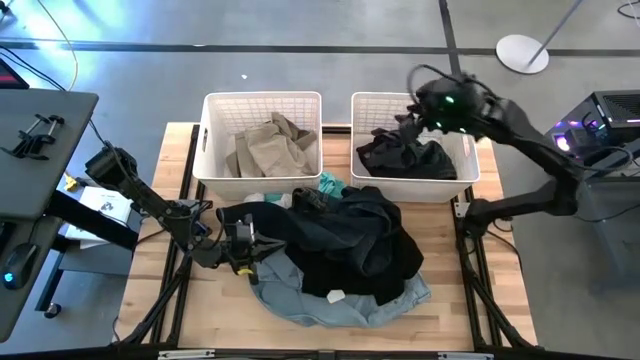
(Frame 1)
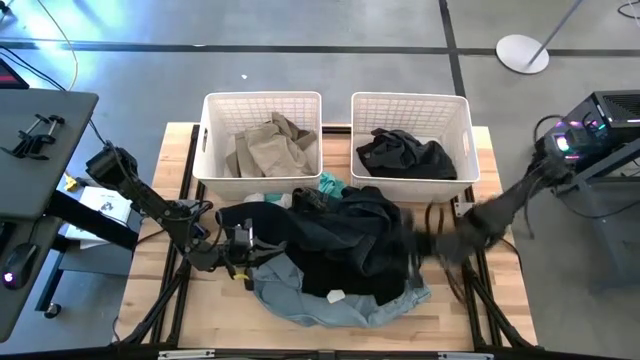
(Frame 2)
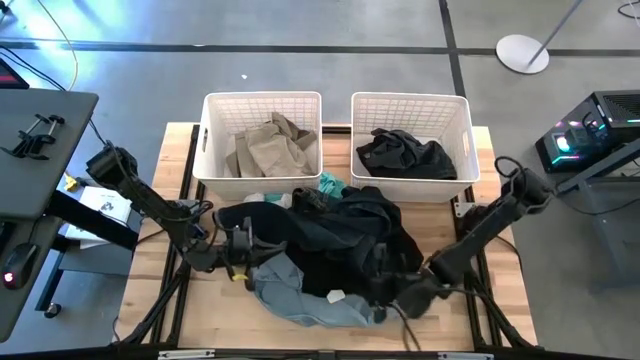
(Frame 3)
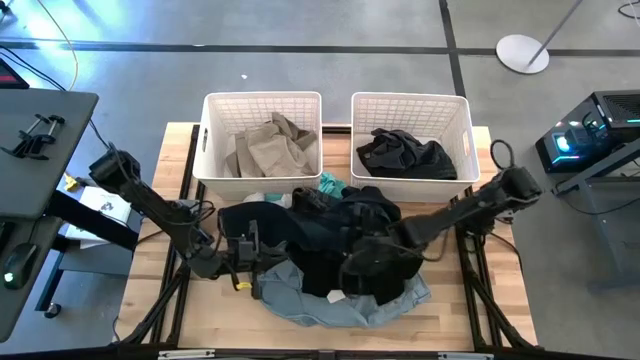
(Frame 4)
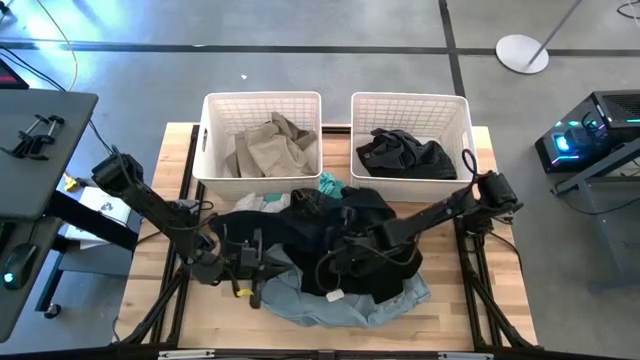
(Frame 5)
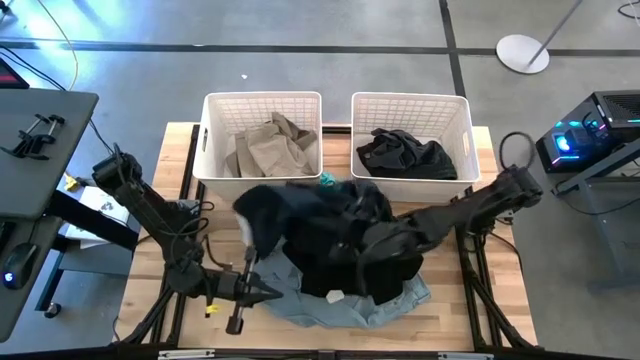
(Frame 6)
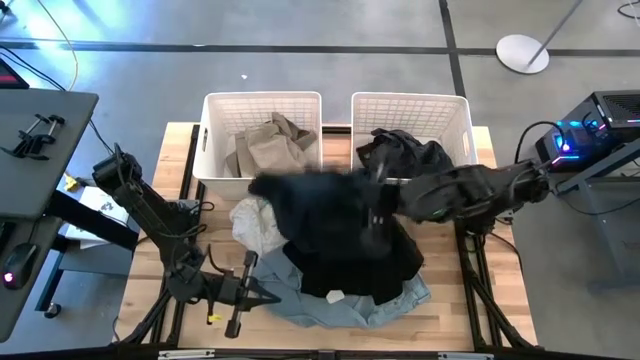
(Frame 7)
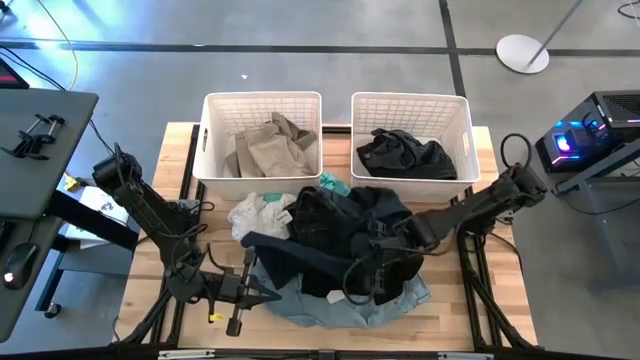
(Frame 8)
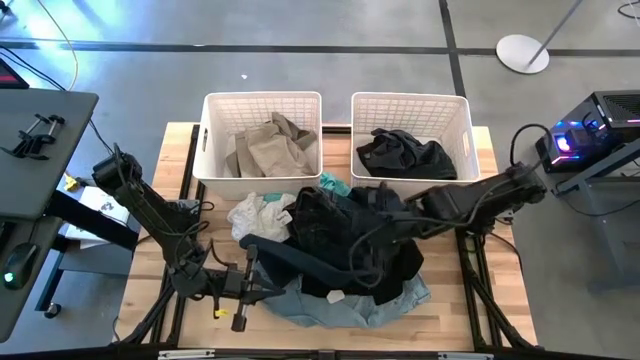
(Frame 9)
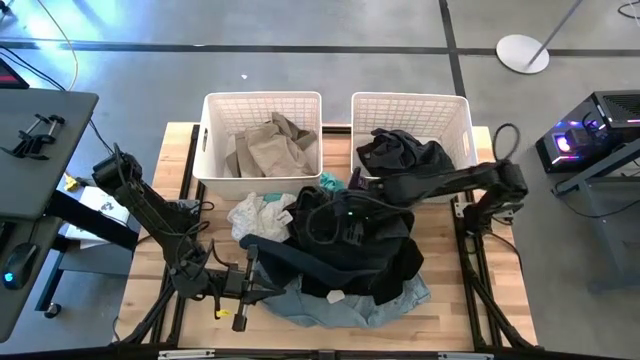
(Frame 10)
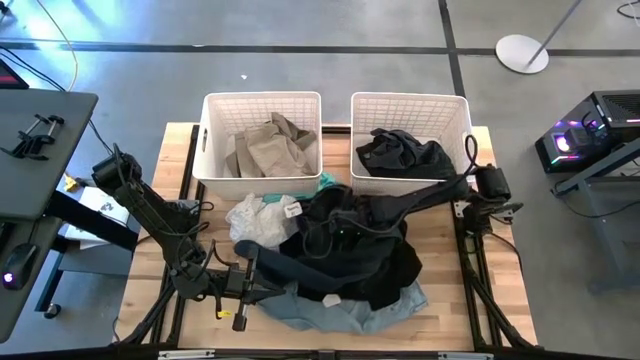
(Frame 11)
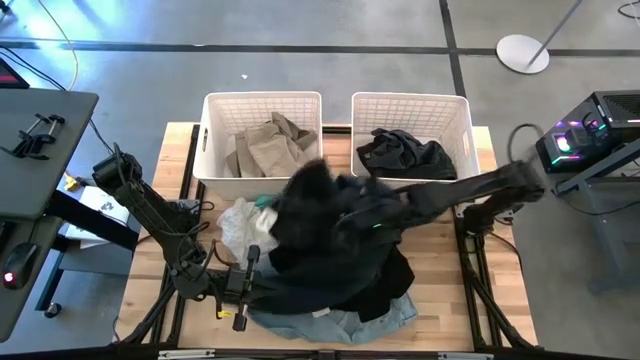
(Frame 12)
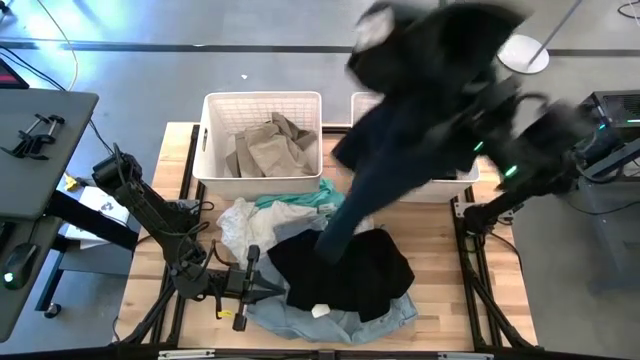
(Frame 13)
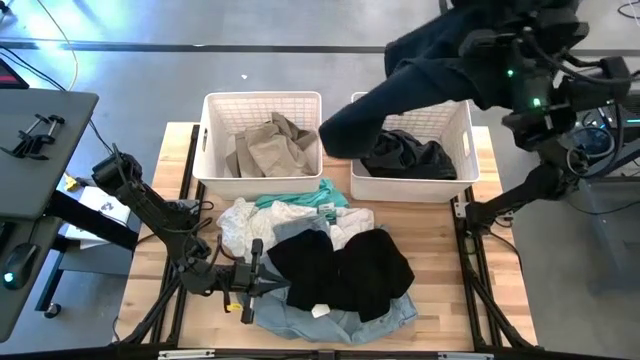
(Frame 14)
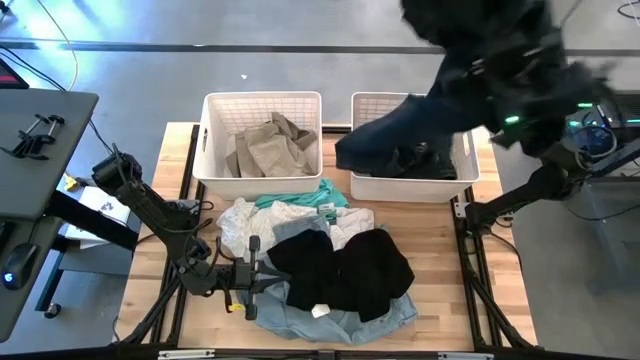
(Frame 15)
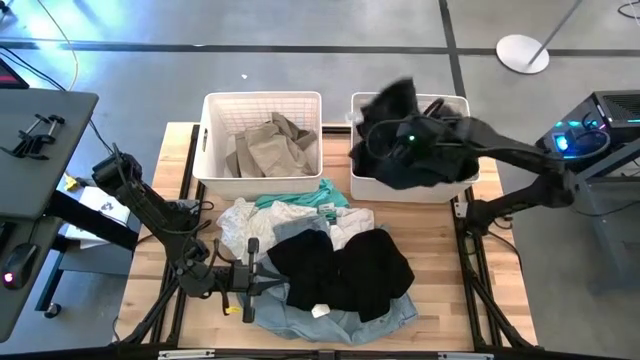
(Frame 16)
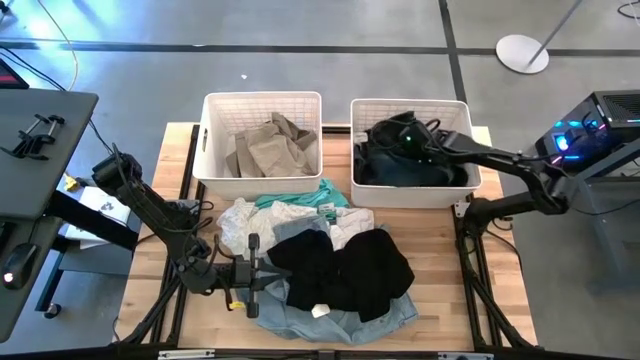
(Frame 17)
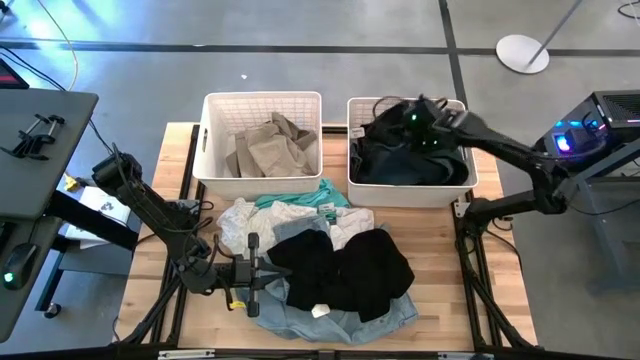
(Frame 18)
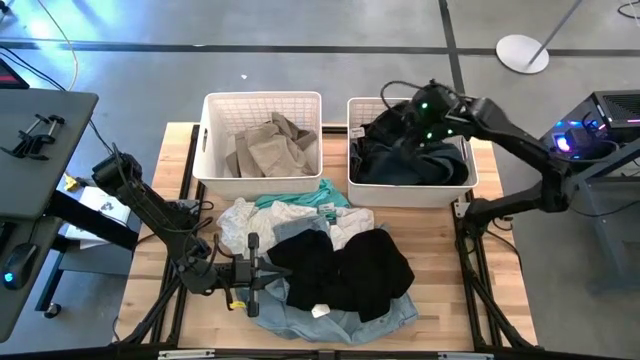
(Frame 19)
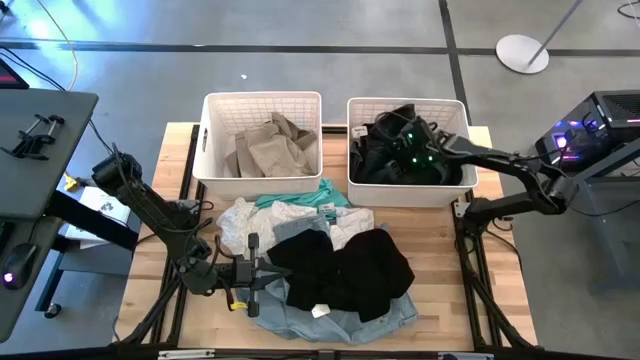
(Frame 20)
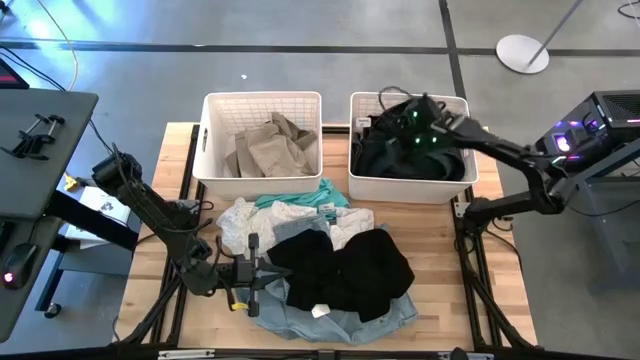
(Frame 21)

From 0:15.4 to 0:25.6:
Task: Sort clothes
Put the dark blue pants into the right white laundry bin

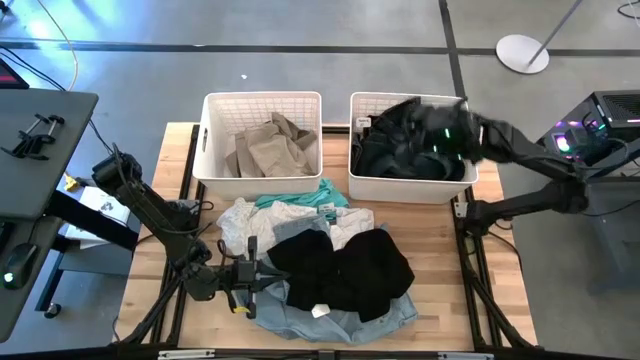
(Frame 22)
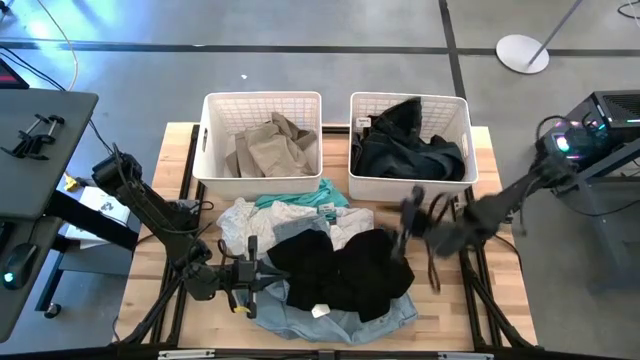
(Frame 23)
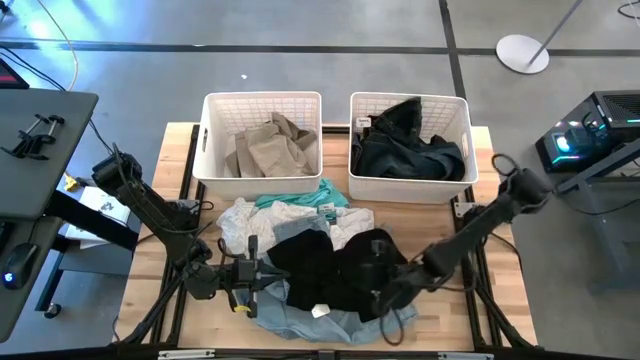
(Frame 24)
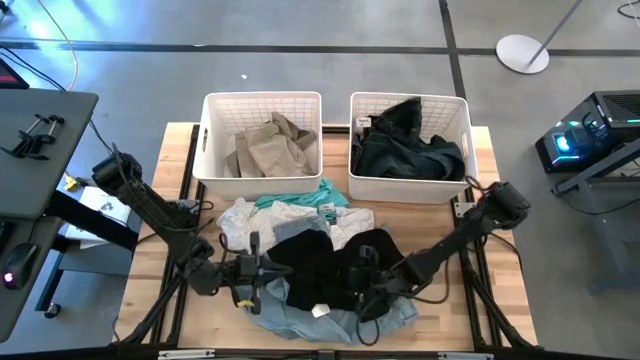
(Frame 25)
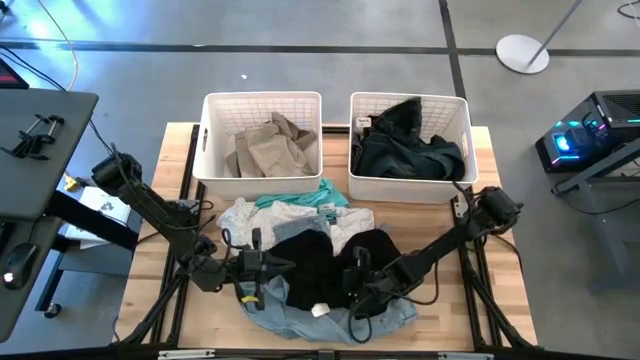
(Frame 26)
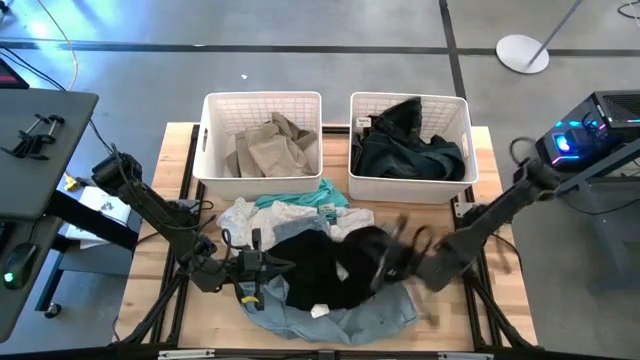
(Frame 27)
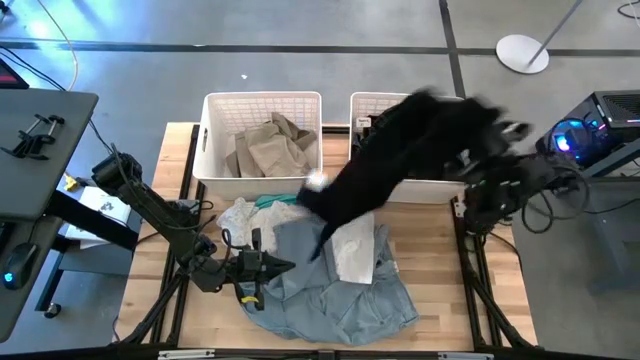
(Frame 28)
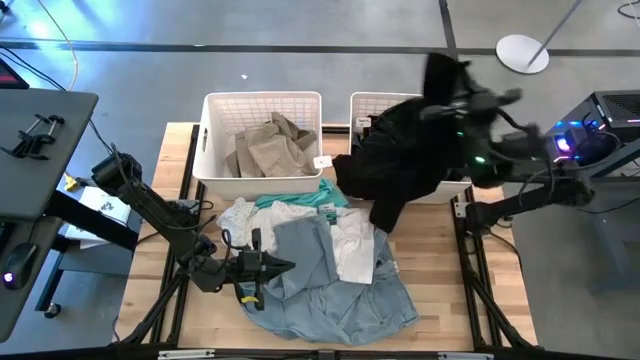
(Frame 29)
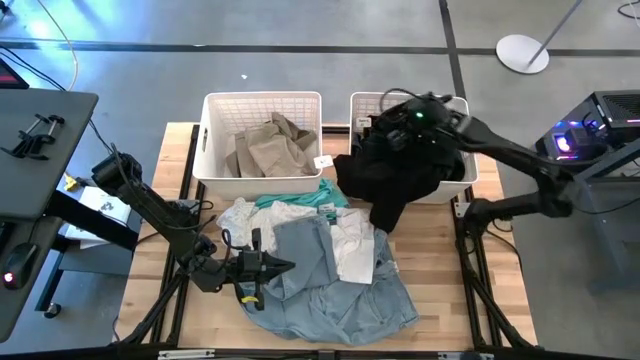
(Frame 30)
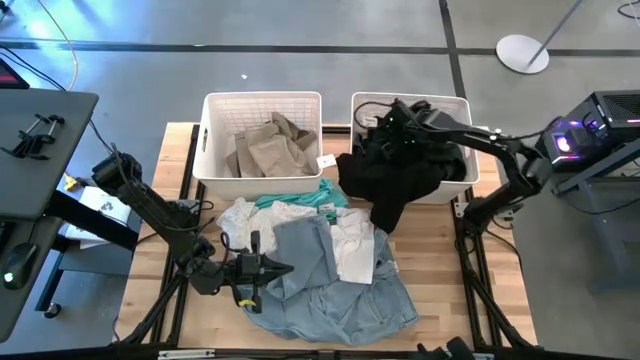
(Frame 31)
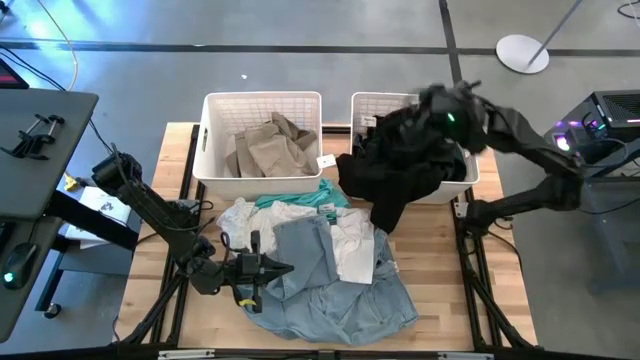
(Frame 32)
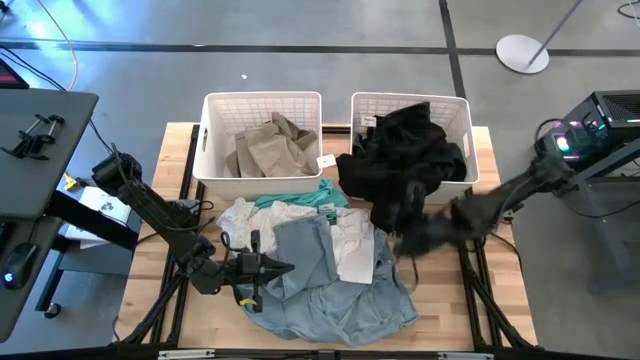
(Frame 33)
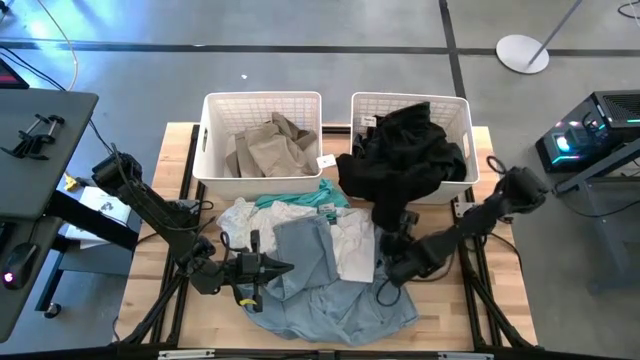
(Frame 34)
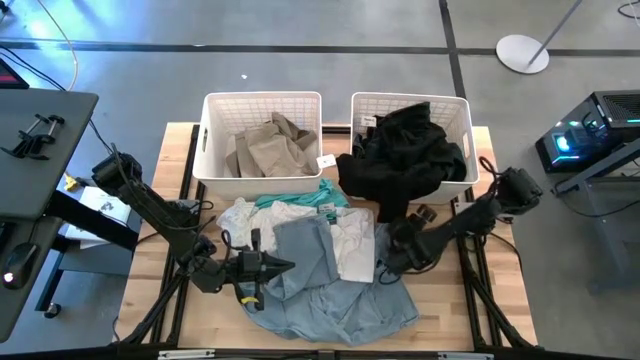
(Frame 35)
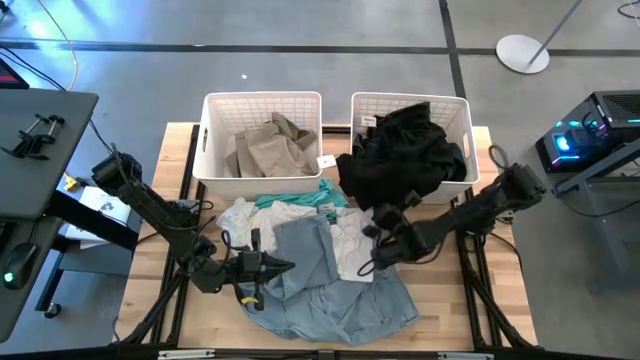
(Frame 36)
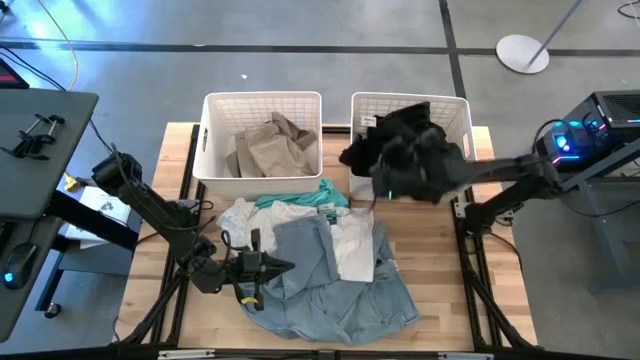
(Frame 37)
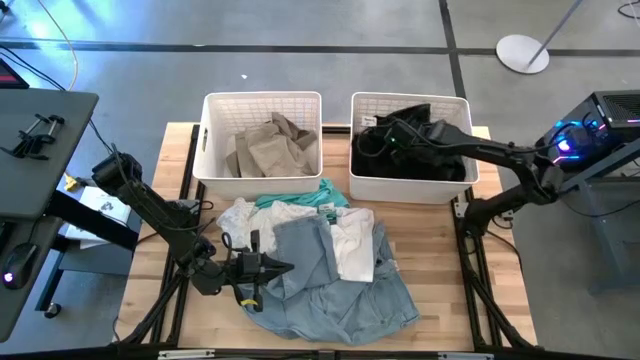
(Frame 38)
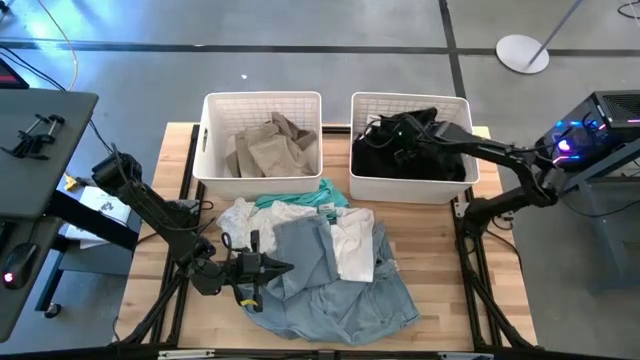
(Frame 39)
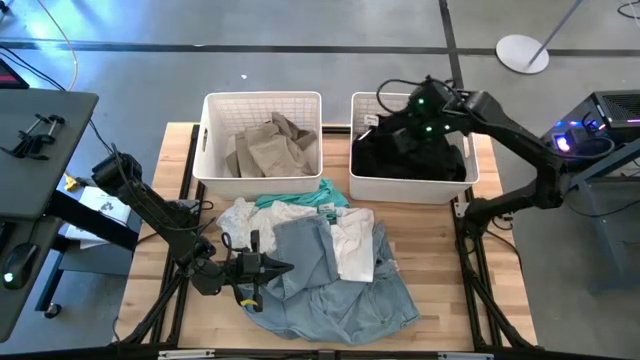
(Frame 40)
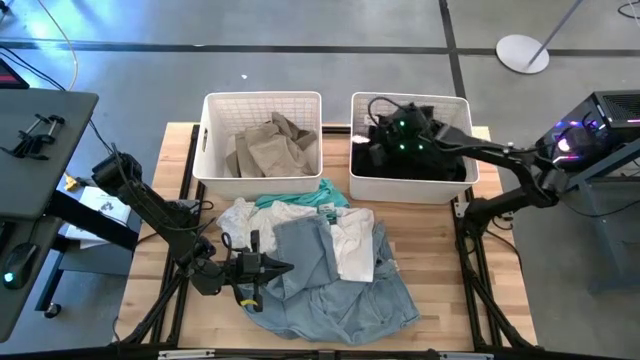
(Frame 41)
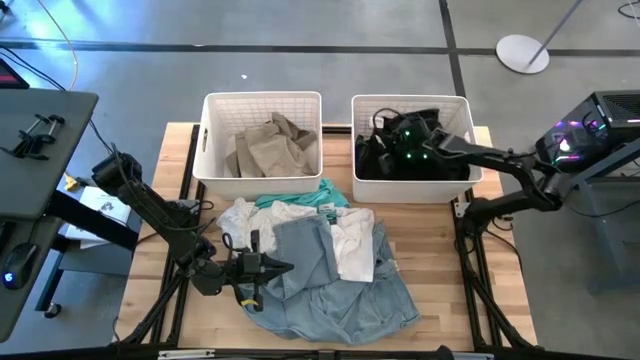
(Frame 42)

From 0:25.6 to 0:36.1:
Put the black shirt into the right white laundry bin
